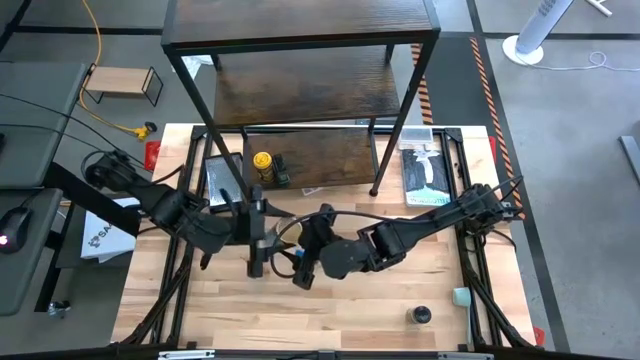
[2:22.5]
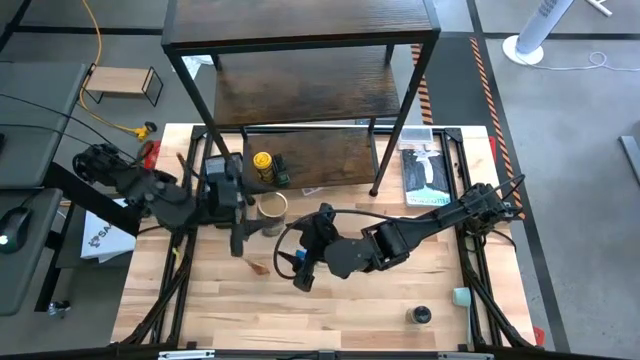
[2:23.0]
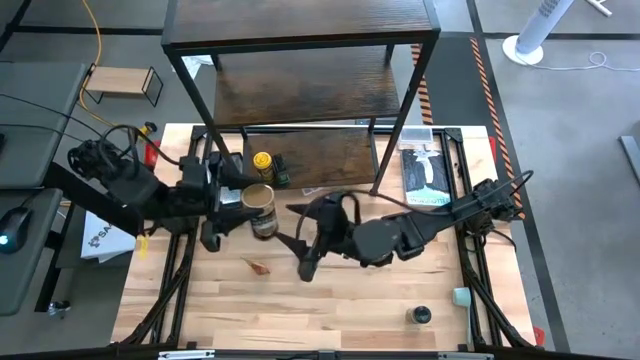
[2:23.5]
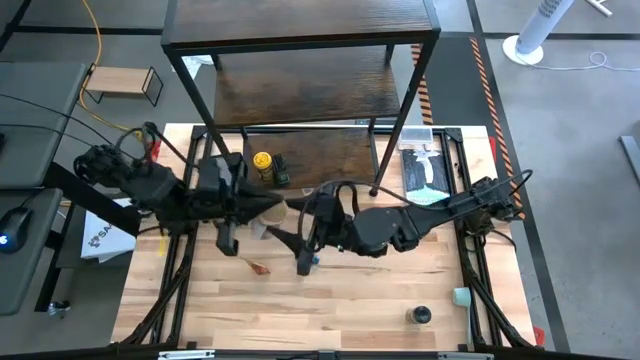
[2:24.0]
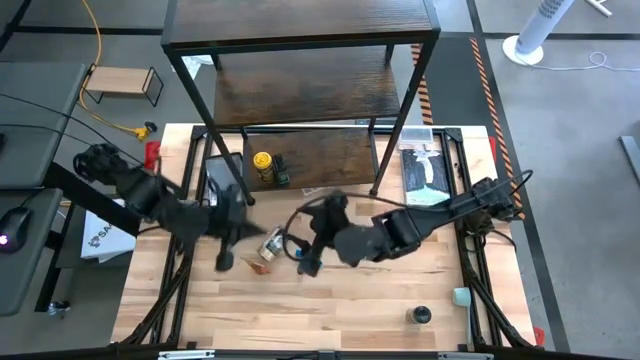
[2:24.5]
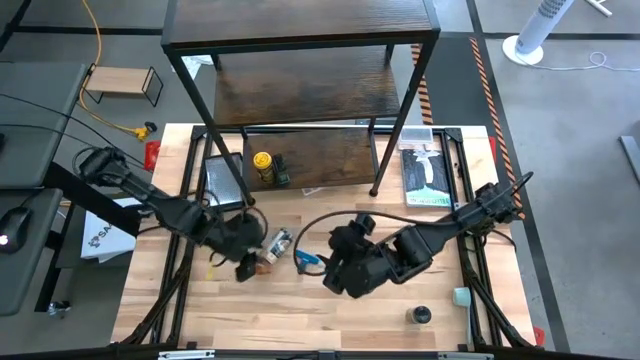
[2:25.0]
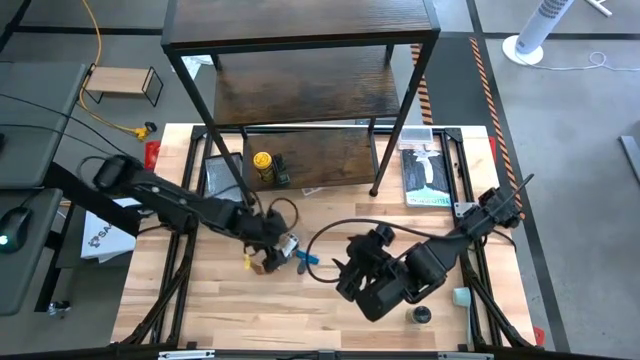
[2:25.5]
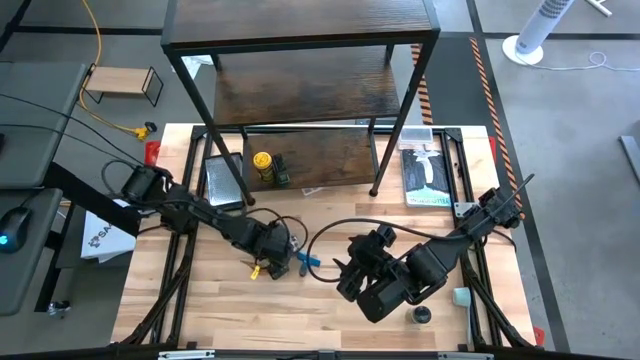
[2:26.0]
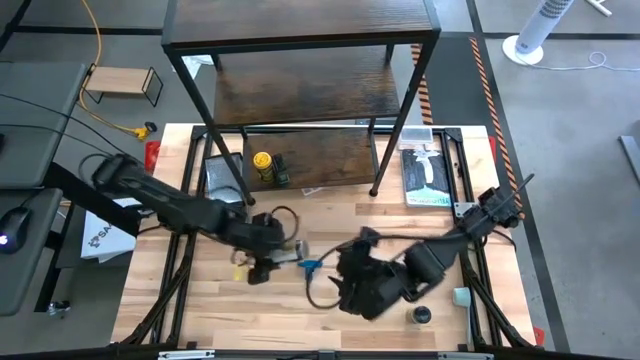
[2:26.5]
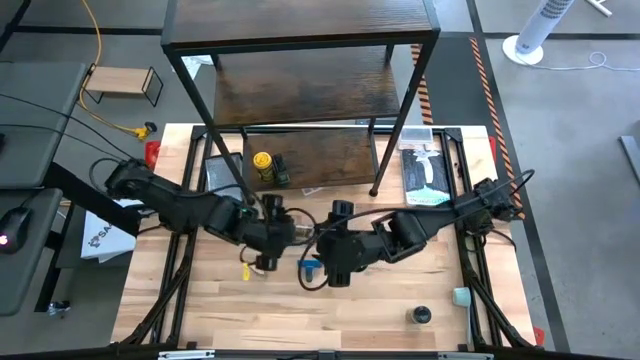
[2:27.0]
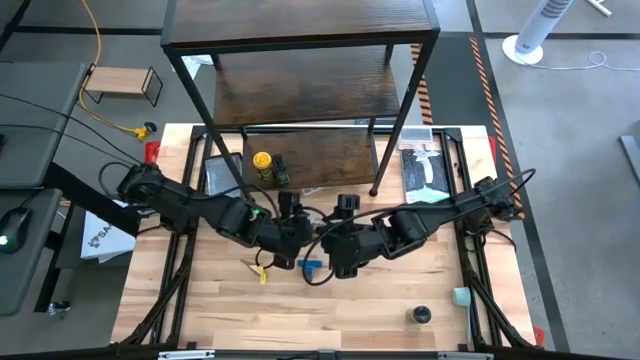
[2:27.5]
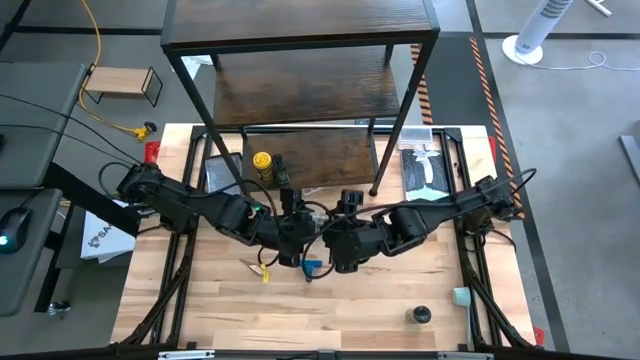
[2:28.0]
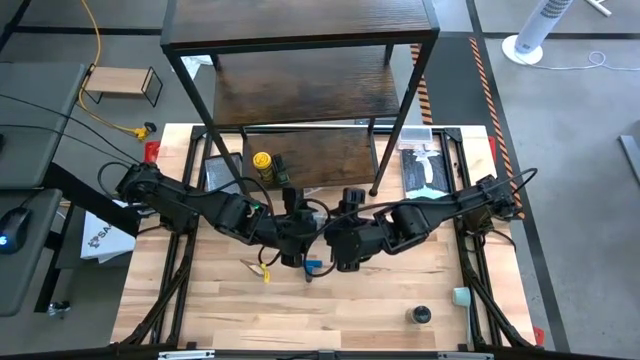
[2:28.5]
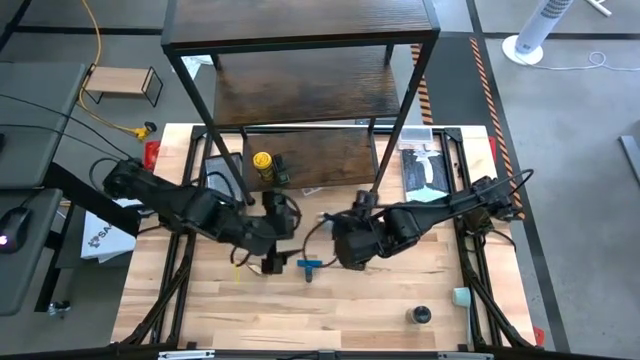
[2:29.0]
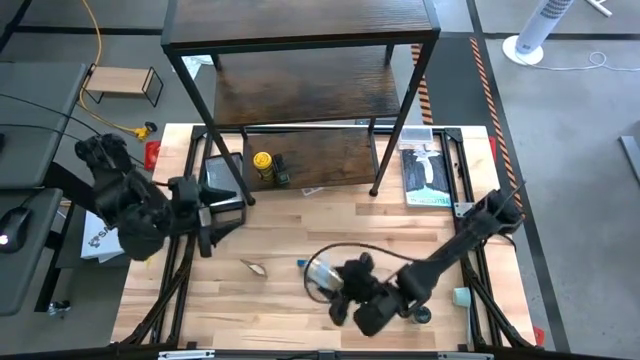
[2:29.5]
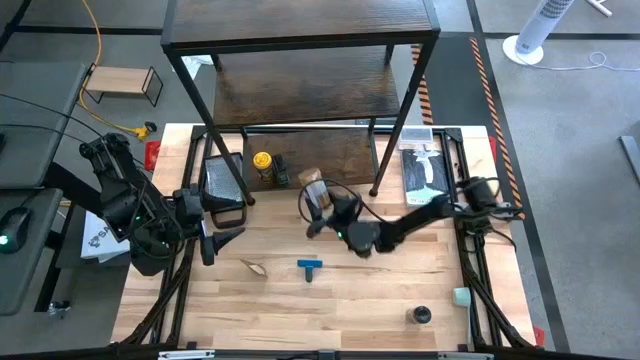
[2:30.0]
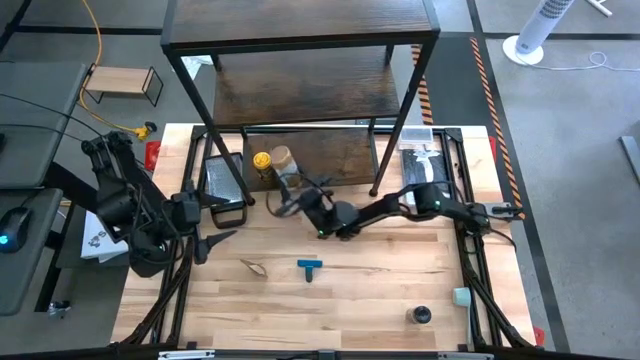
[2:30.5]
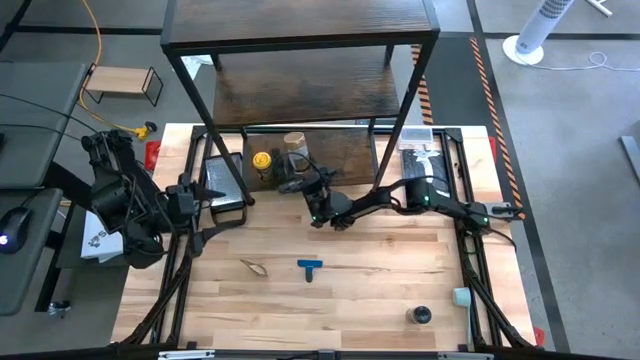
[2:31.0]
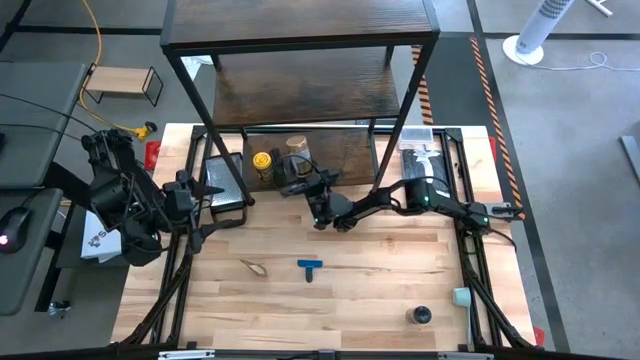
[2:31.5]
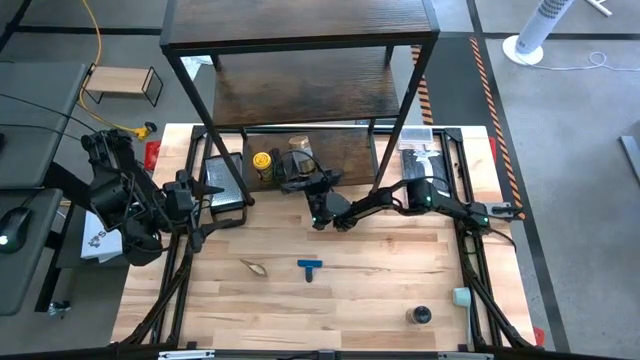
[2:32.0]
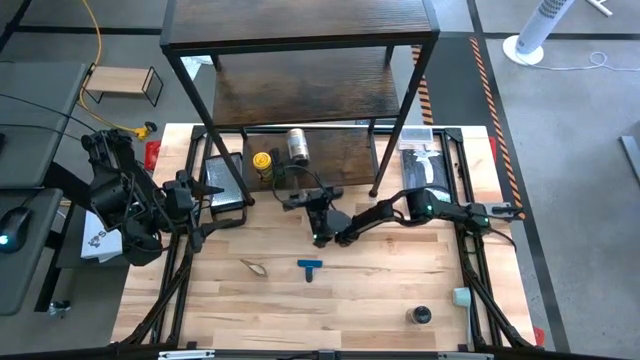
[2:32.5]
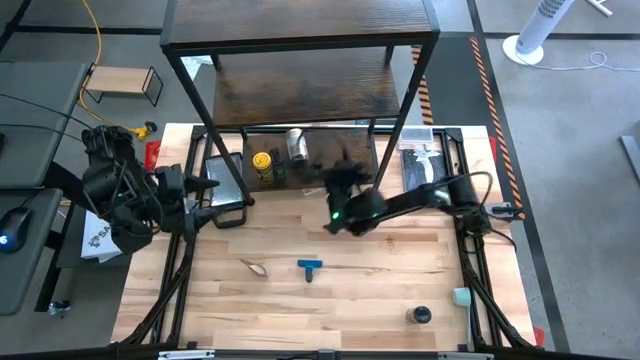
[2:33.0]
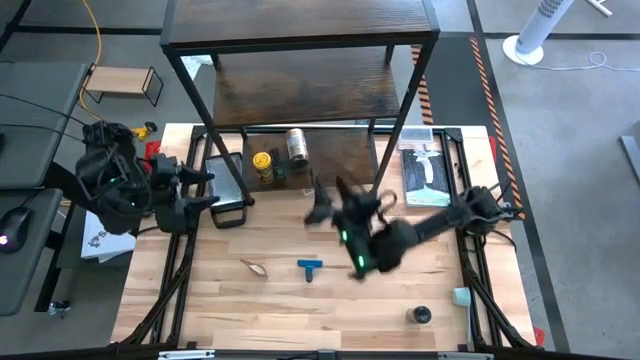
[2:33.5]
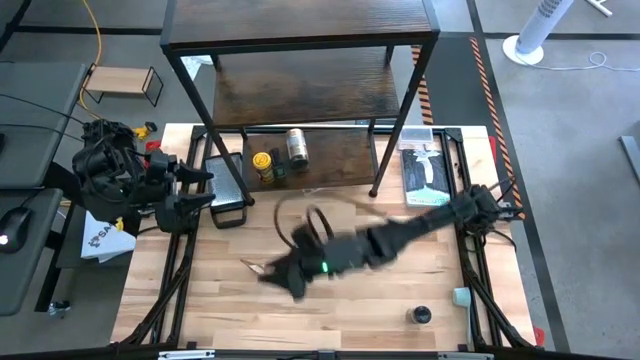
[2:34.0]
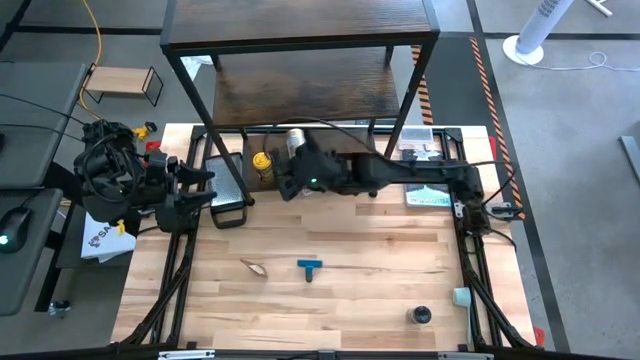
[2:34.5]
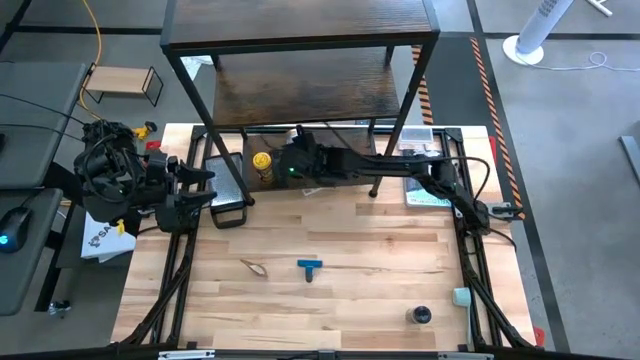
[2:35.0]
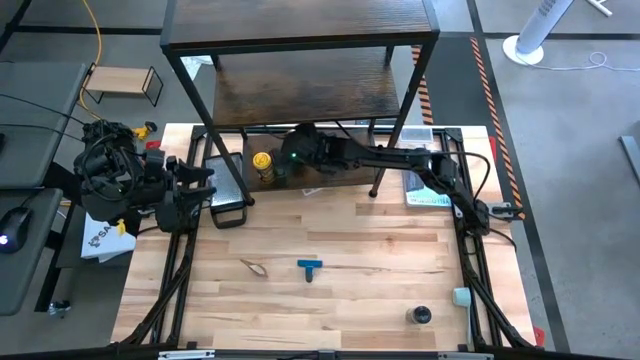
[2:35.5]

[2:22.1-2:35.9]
Task: Shelf spices
Put the brown seasoning bottle on the shelf

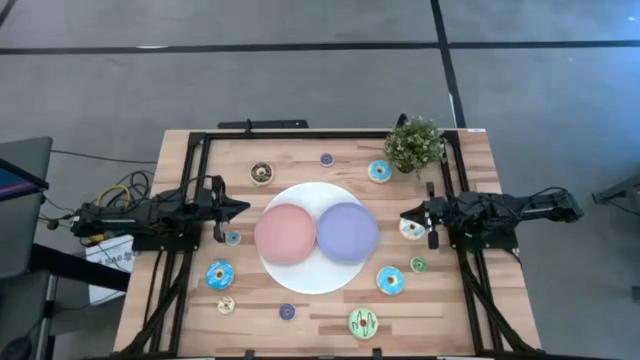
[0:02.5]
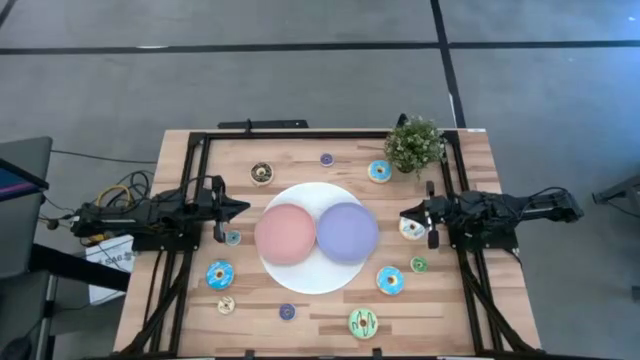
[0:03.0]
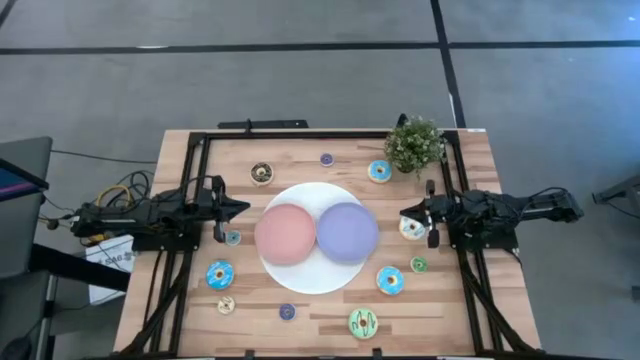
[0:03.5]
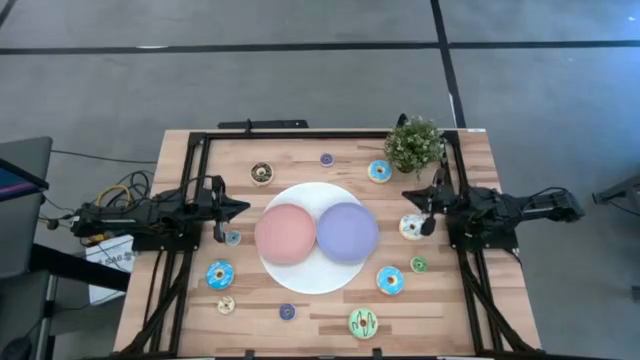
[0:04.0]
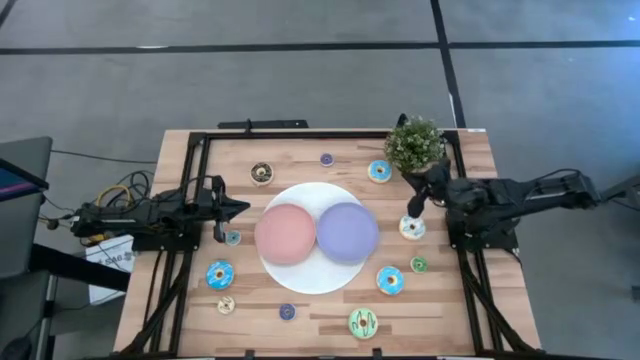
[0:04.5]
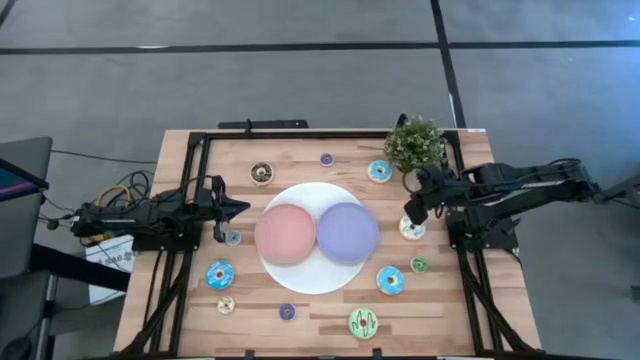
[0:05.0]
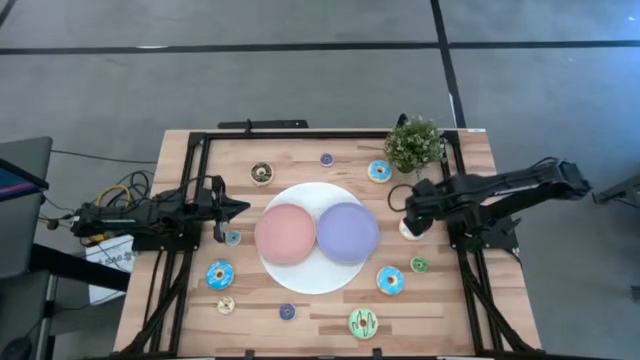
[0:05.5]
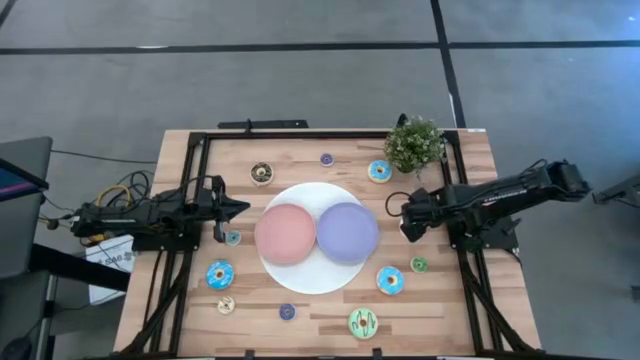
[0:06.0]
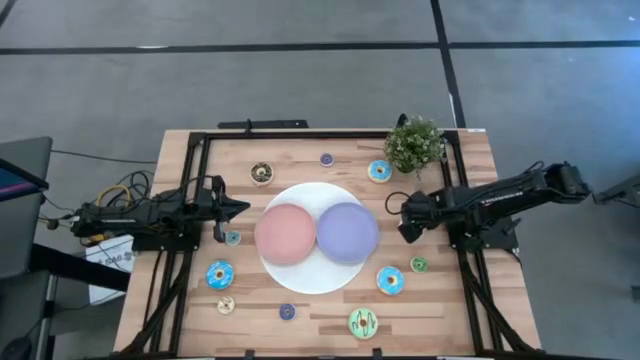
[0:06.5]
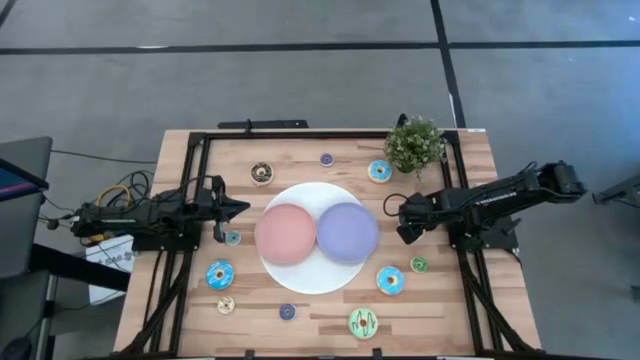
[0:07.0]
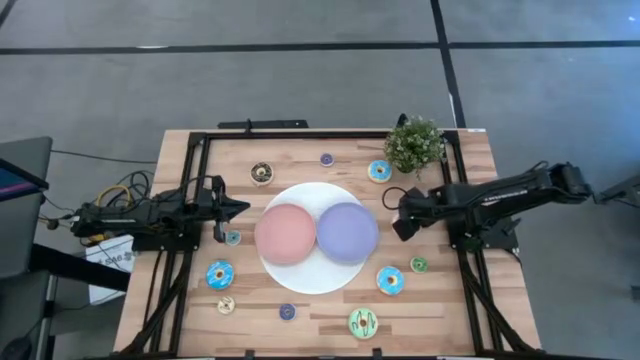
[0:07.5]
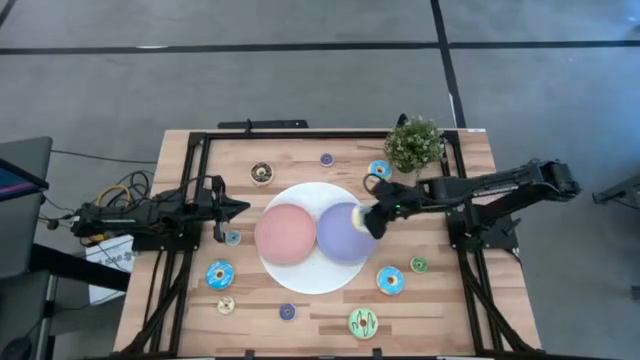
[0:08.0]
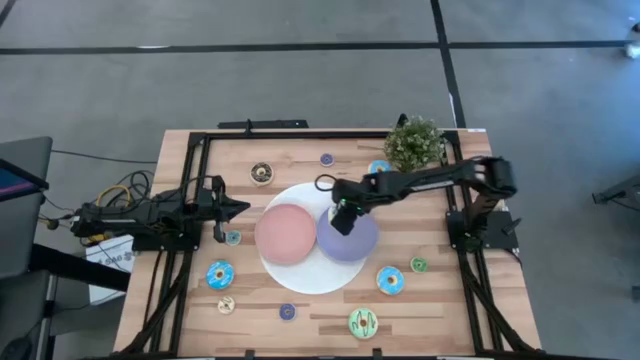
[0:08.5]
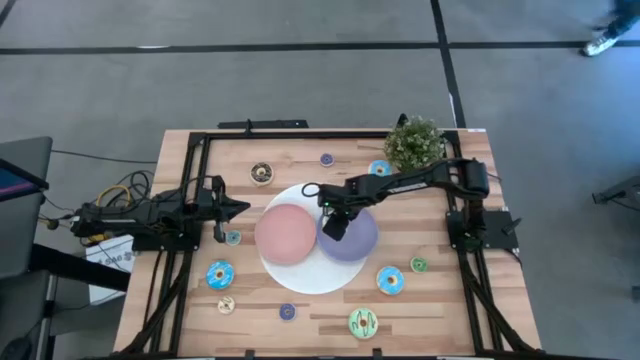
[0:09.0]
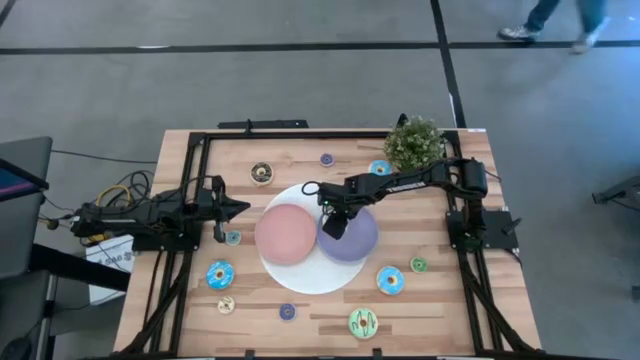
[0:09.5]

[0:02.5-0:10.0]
Task: Pick & Place donuts
Put the big white donut on the violet plate
